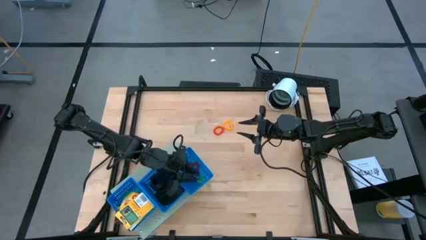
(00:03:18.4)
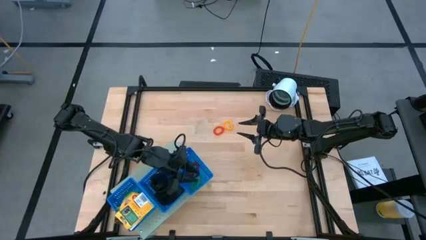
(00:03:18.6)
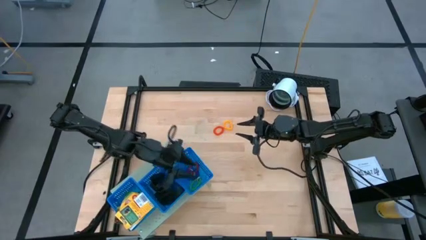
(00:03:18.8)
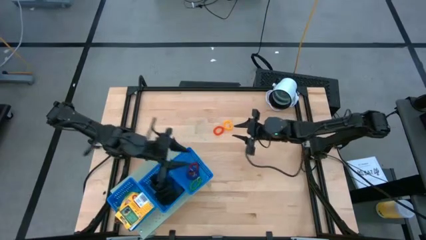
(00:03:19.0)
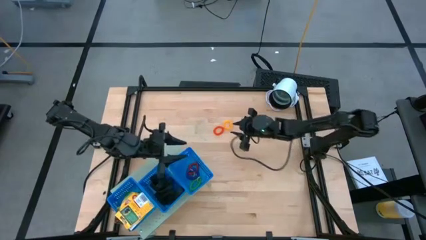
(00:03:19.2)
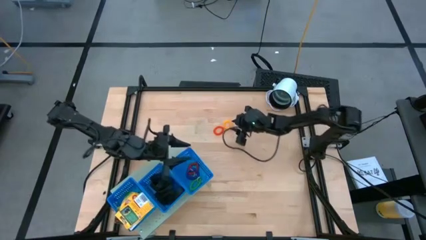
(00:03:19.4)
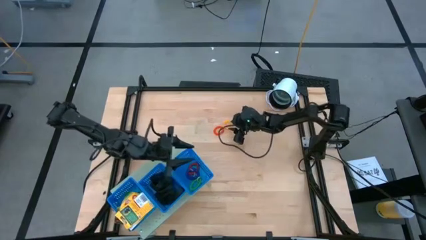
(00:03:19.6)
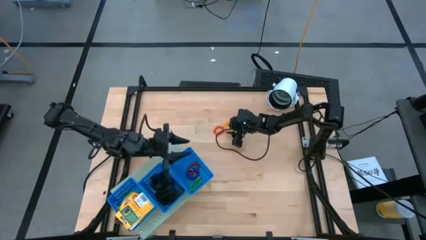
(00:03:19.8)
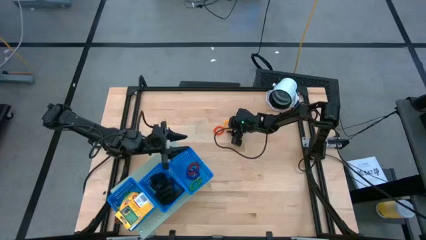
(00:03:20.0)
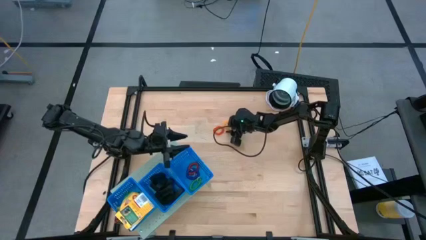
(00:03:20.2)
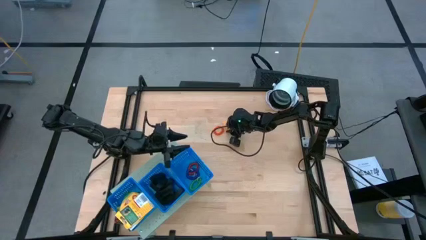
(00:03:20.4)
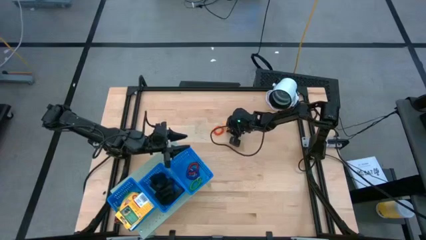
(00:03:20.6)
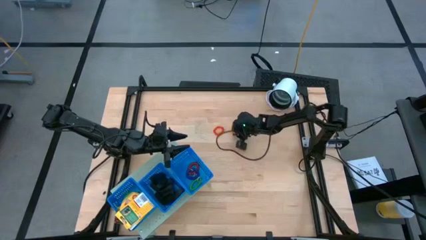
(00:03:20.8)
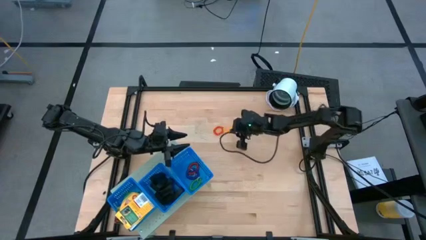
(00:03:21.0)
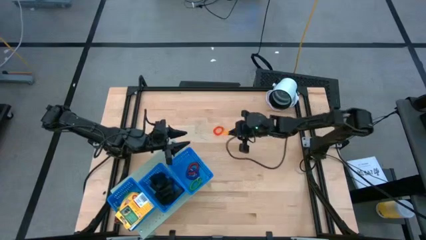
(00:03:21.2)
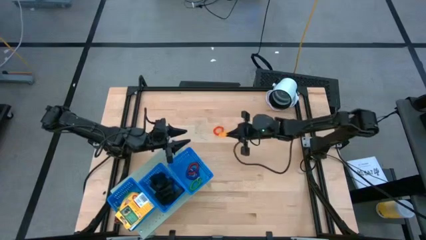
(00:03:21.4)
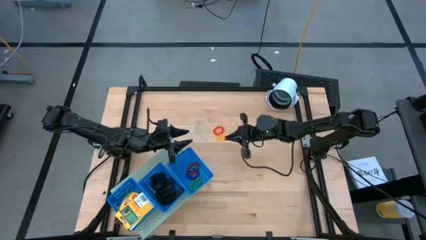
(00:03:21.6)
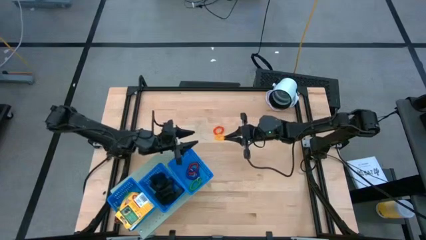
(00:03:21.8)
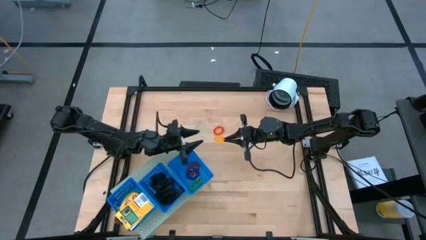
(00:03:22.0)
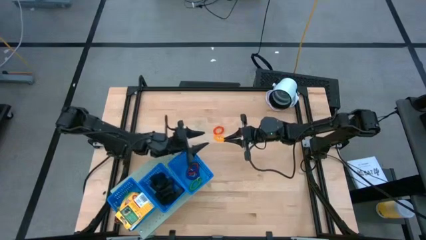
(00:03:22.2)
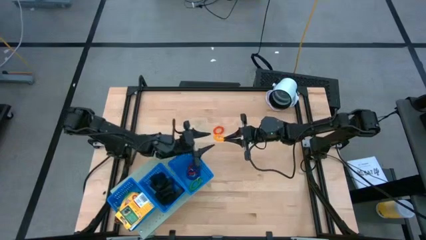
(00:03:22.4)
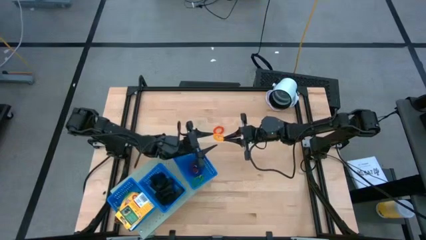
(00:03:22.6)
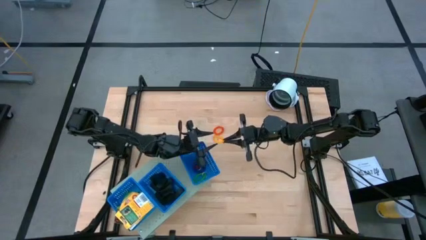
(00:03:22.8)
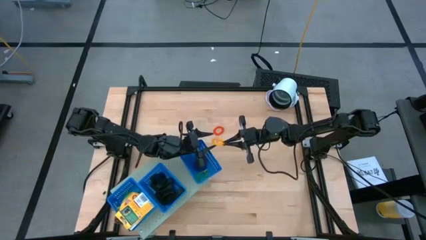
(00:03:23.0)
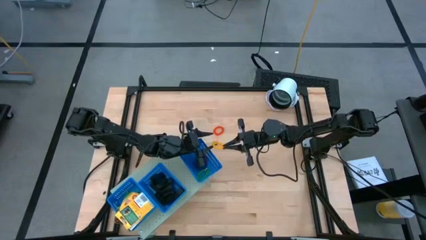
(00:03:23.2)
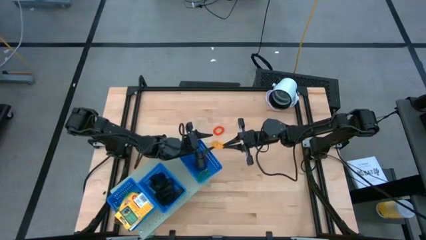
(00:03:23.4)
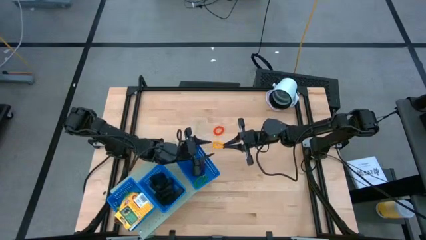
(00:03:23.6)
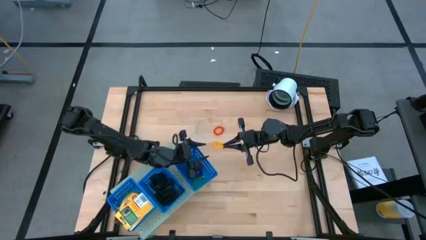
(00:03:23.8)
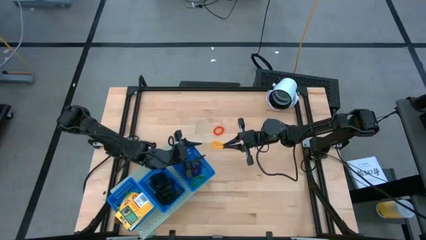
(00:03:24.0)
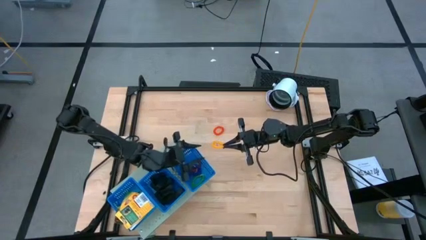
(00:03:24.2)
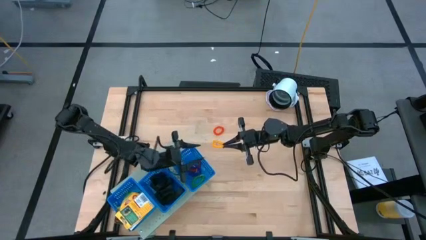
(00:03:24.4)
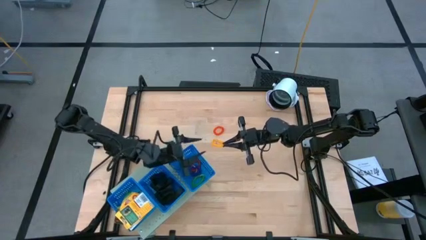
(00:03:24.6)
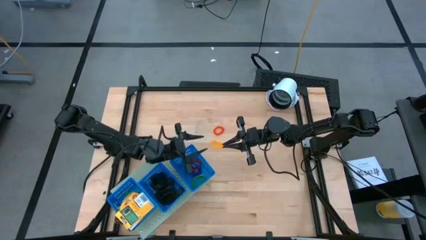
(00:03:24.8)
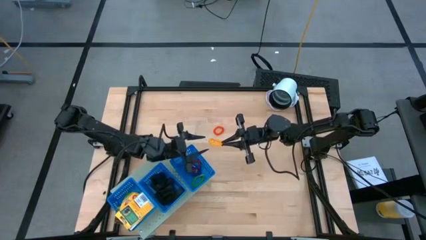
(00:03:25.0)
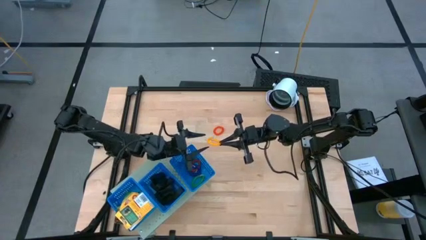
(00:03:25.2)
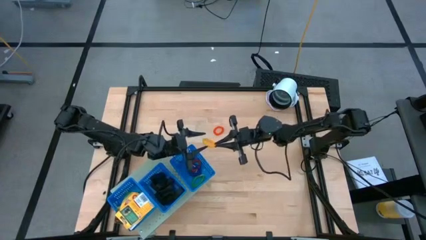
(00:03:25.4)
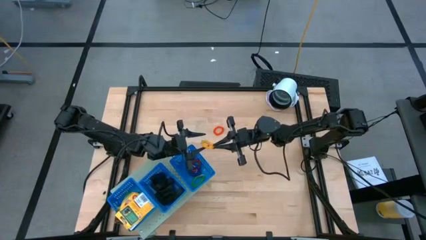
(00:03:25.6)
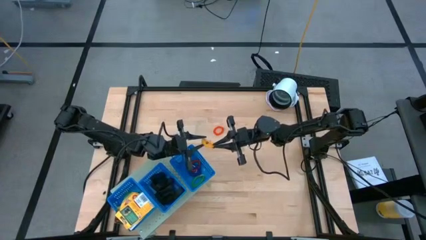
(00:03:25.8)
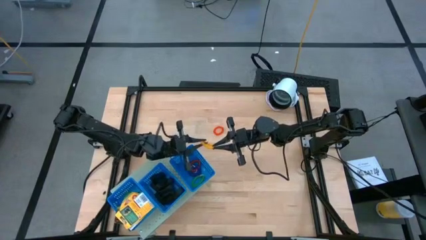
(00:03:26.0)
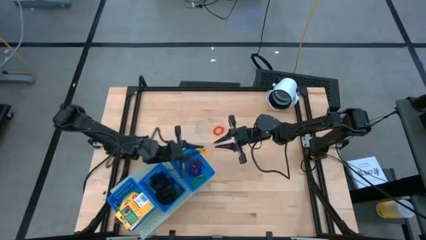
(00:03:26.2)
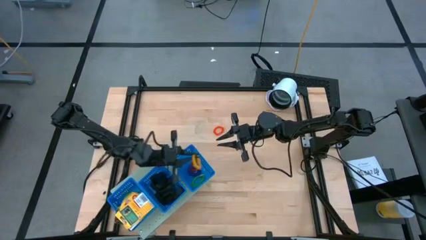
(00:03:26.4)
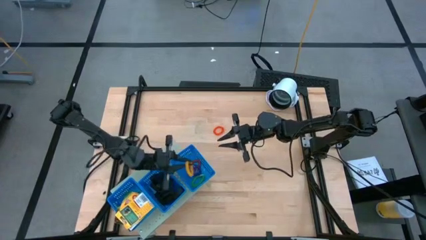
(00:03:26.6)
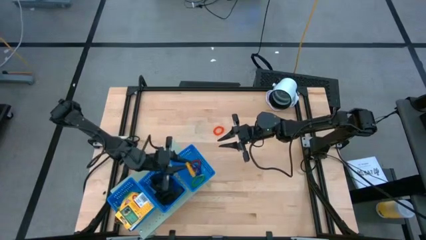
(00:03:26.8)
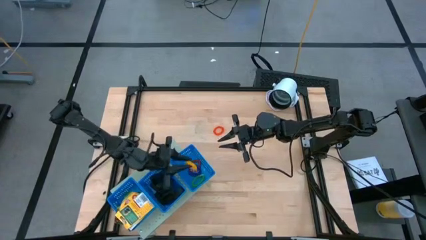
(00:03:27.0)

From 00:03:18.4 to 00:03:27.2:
Task: Pick & Place Office Desk Supplies
Put the yellow spring rubber band into the top blue basket on the shelf

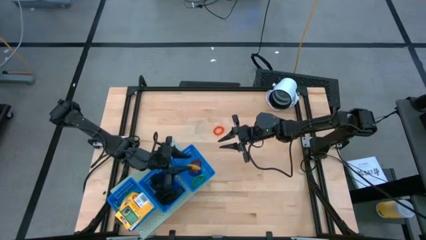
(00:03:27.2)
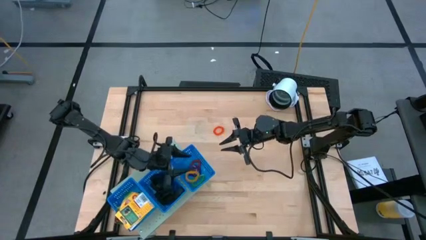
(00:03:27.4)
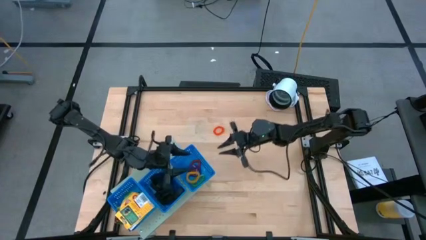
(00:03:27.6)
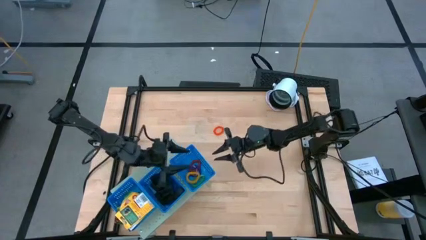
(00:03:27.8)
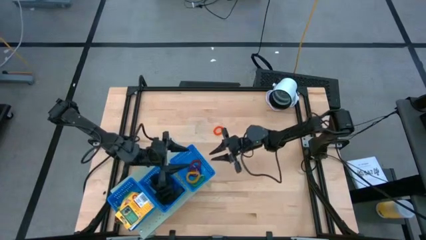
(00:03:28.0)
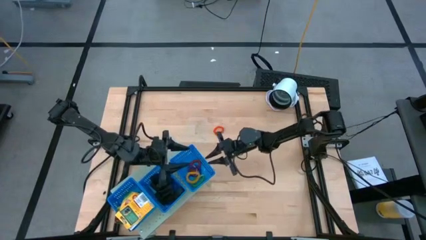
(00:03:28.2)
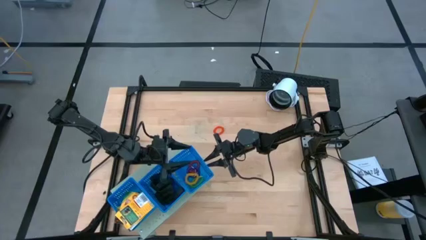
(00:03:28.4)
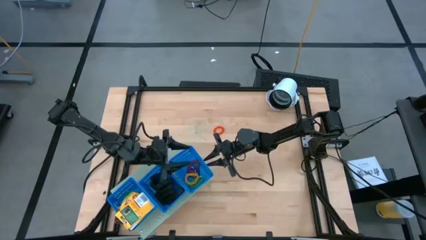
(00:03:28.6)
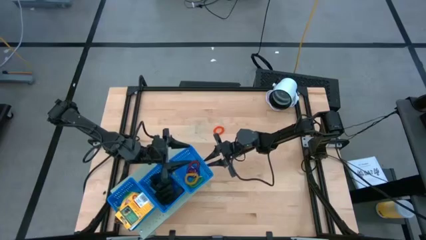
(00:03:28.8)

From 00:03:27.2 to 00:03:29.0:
Adjust the top blue basket on the shelf

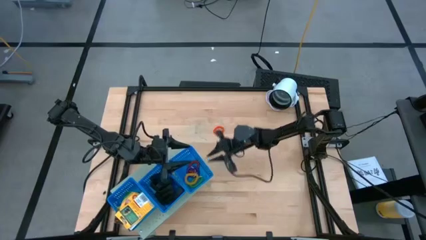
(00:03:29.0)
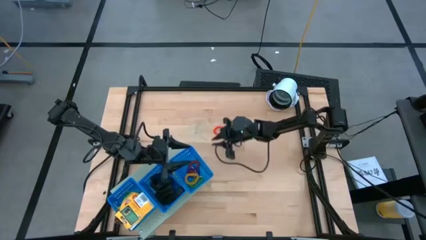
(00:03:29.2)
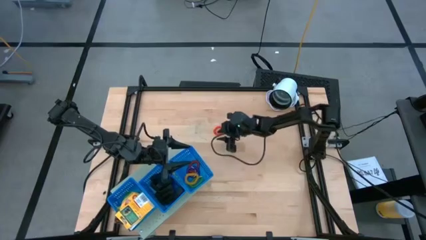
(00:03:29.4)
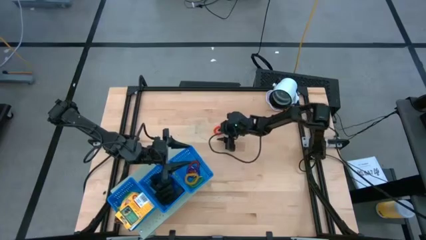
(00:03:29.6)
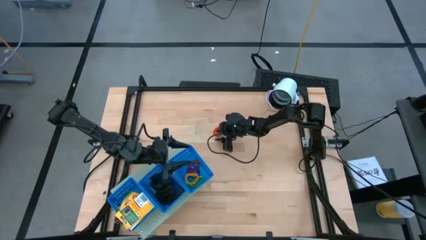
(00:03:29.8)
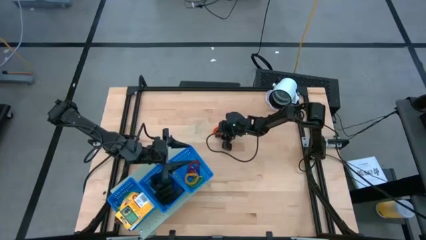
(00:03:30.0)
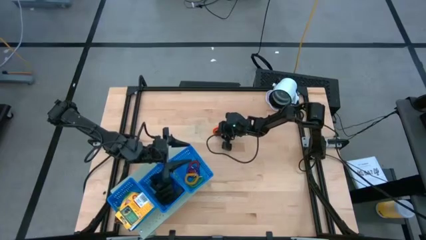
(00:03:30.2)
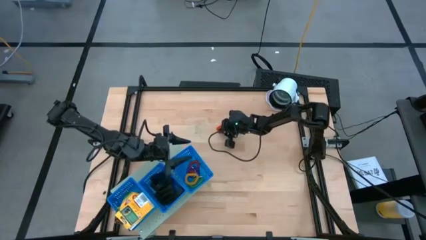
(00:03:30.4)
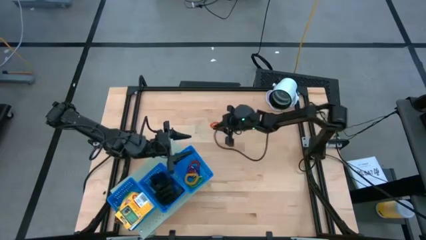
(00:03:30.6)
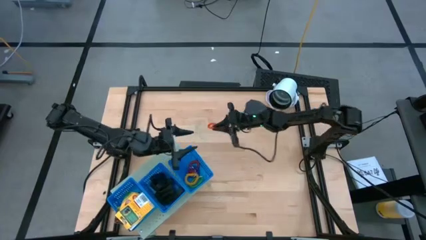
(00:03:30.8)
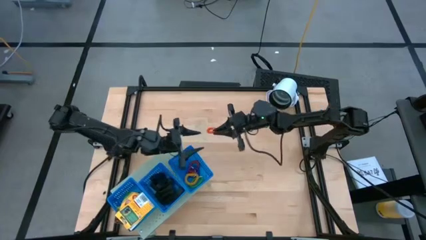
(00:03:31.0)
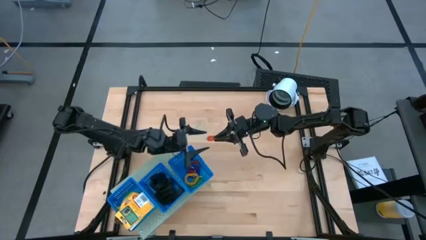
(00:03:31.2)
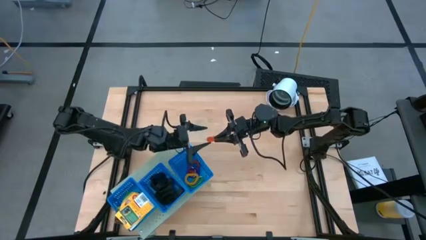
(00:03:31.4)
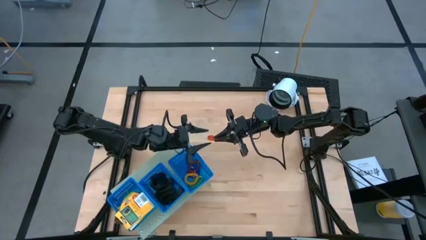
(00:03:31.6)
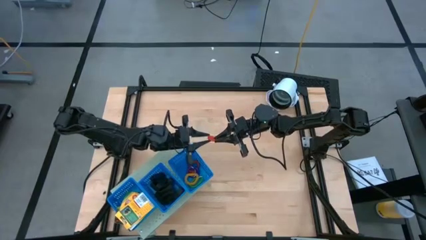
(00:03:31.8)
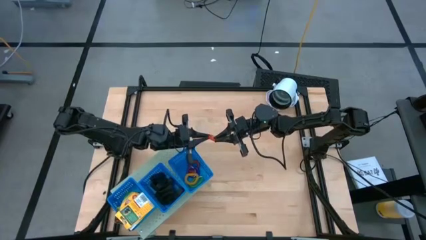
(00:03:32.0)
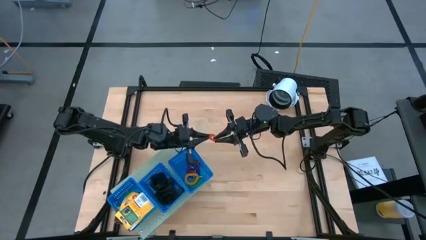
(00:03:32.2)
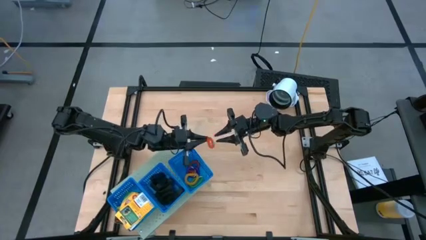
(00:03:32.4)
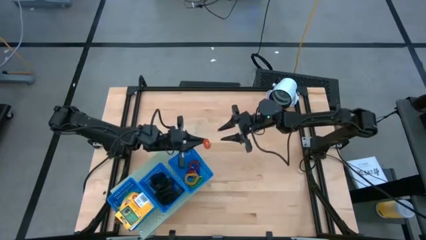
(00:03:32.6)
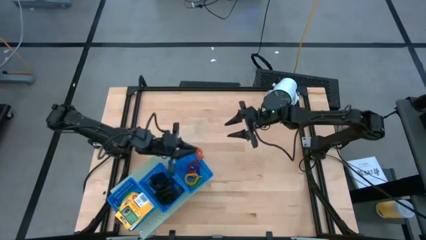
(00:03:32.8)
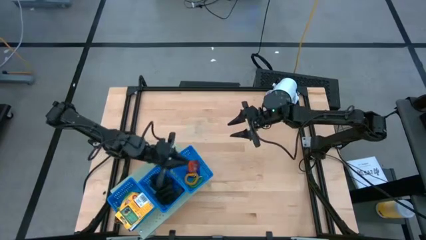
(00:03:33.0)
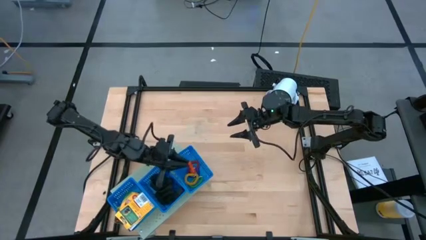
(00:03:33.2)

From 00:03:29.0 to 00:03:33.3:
Put the orange spring rubber band into the top blue basket on the shelf
